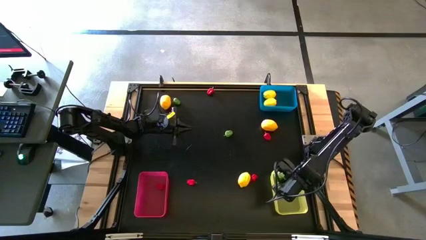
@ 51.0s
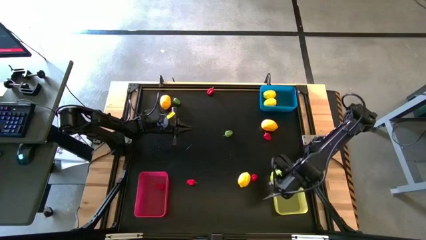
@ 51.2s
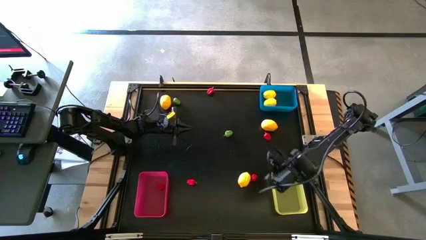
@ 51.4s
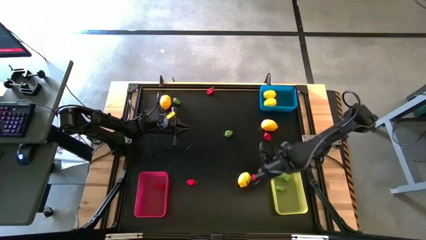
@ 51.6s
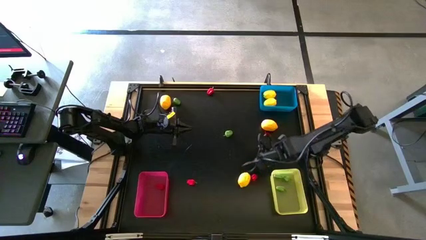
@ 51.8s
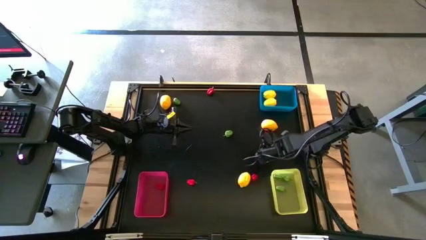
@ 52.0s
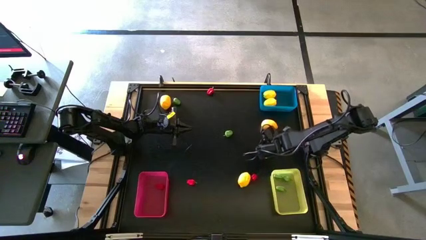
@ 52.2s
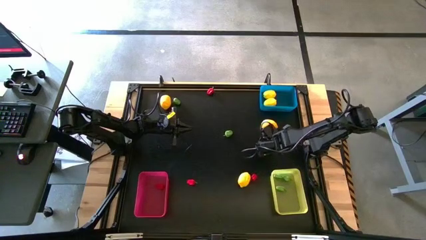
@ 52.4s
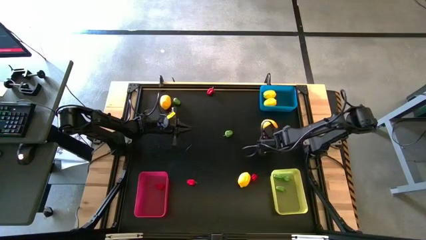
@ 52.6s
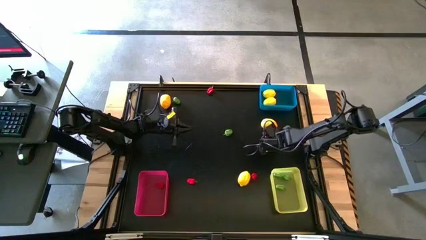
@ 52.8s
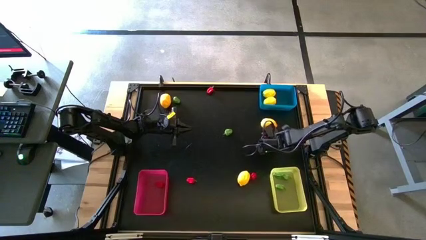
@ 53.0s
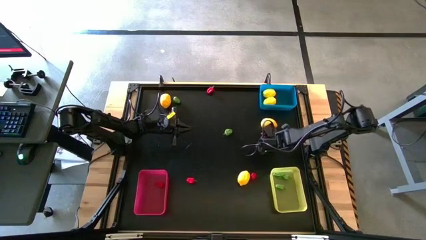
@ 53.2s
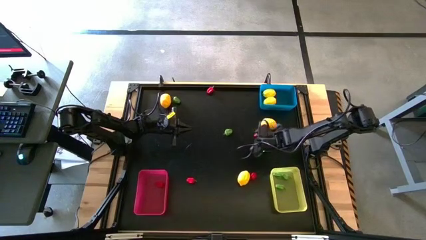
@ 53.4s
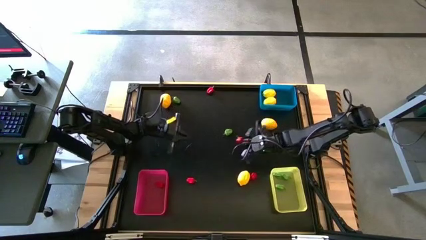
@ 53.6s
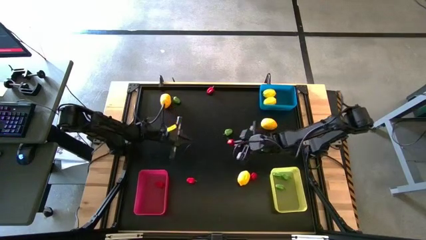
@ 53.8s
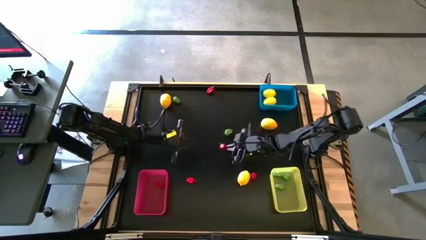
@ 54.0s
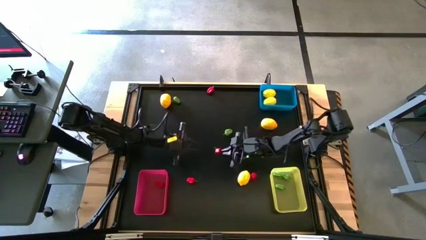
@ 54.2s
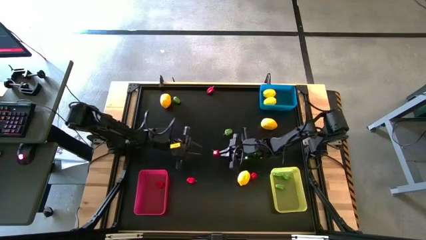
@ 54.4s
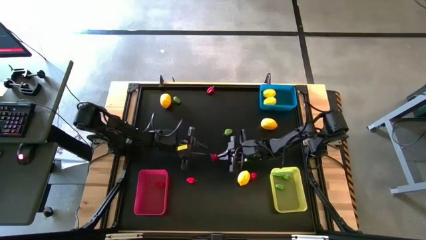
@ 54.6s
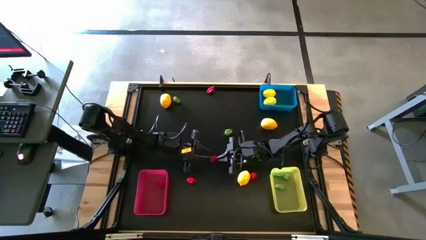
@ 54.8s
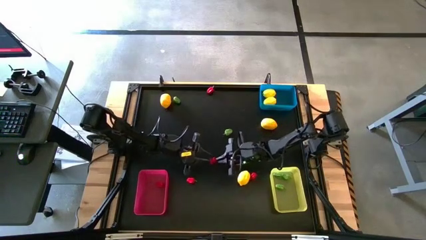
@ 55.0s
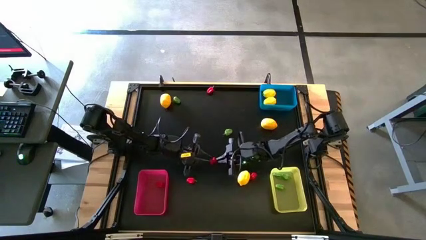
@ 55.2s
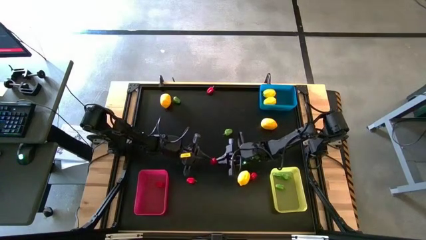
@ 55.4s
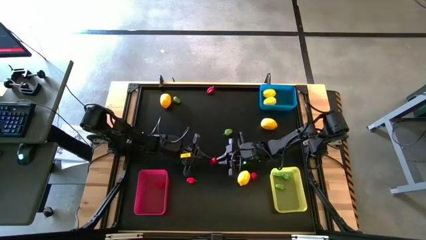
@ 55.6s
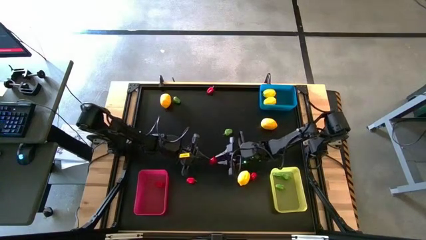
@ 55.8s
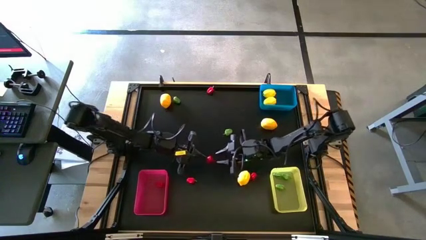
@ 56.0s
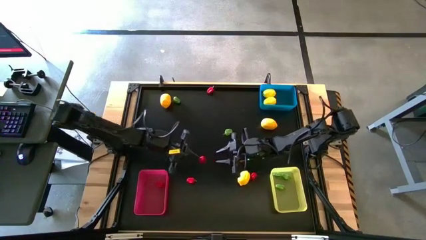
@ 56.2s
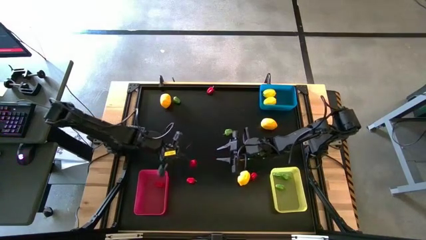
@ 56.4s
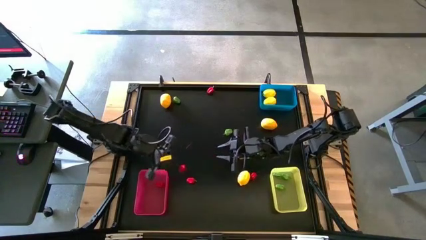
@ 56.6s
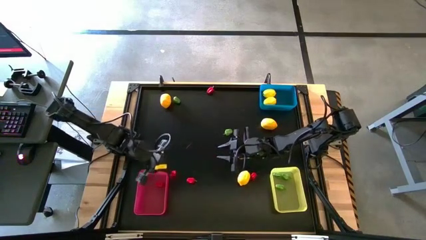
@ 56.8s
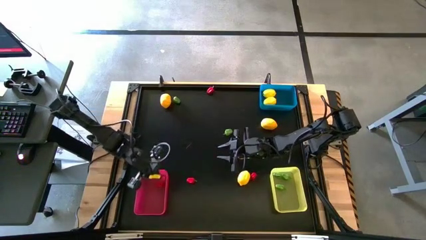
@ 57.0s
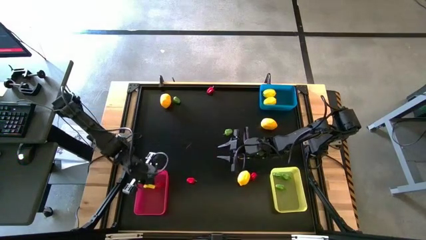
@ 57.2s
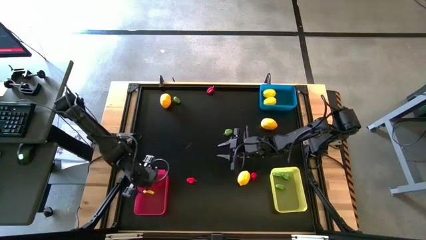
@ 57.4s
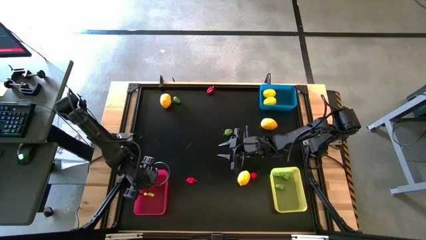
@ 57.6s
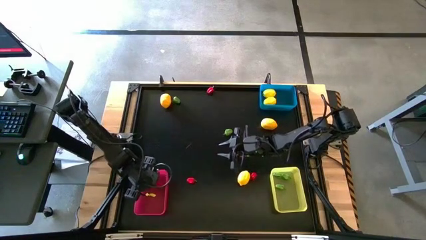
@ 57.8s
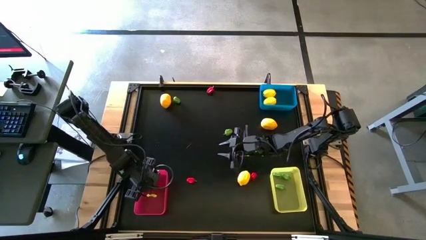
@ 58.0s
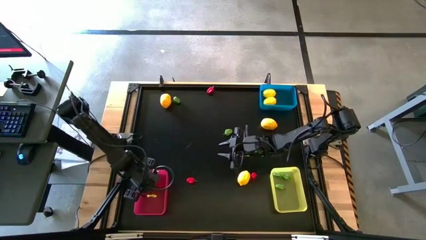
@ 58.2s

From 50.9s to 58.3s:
Task: Sort produce into baskets
Put the red chili pepper into the red bin

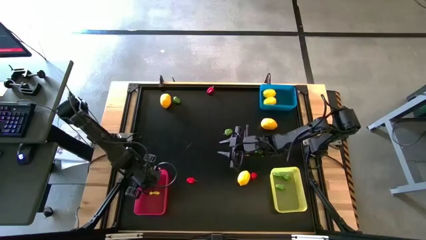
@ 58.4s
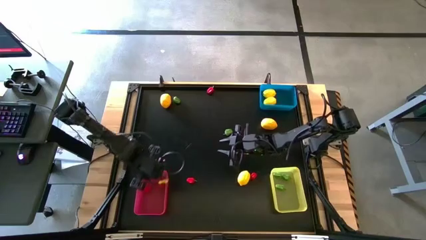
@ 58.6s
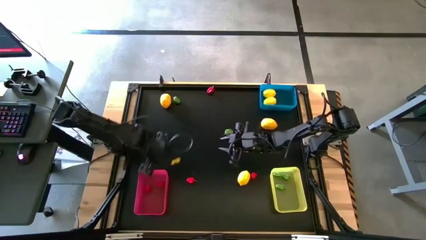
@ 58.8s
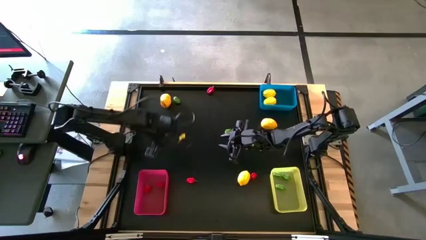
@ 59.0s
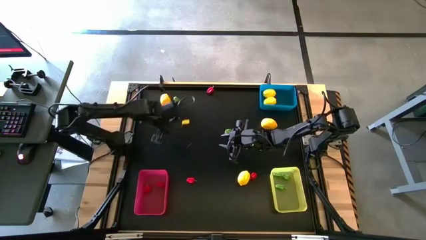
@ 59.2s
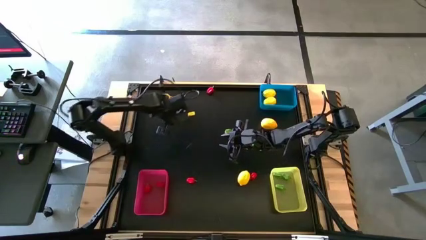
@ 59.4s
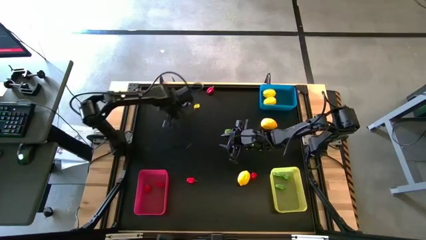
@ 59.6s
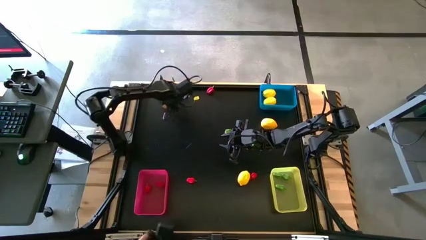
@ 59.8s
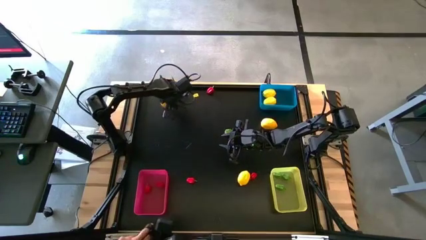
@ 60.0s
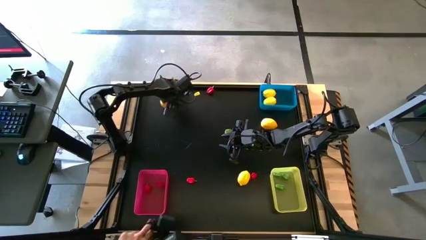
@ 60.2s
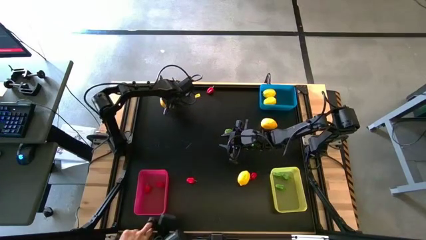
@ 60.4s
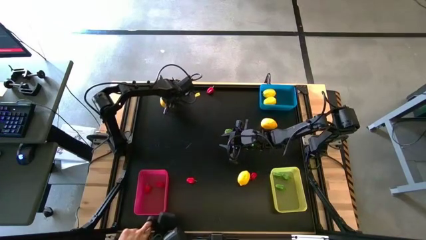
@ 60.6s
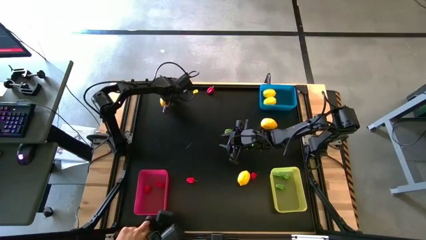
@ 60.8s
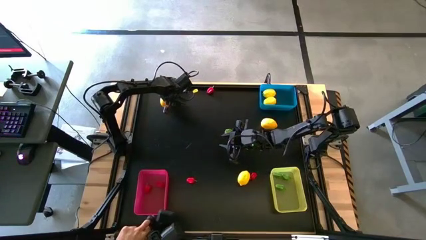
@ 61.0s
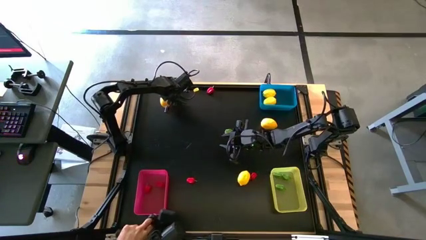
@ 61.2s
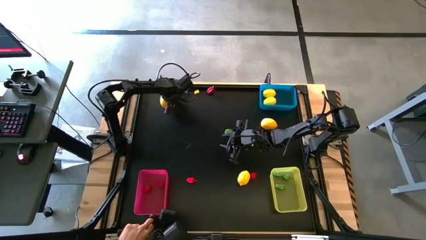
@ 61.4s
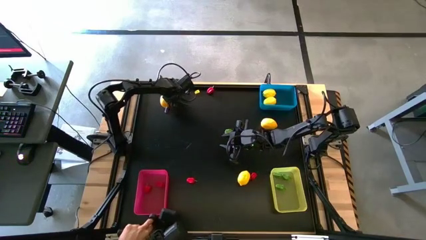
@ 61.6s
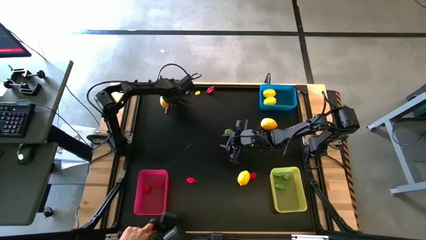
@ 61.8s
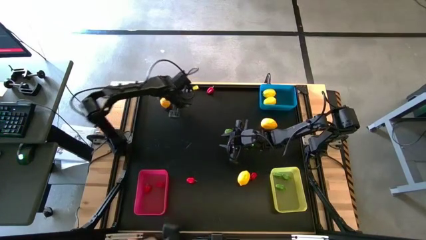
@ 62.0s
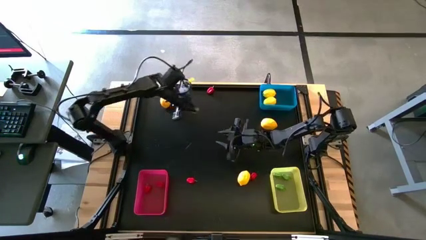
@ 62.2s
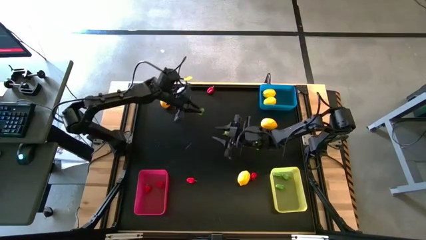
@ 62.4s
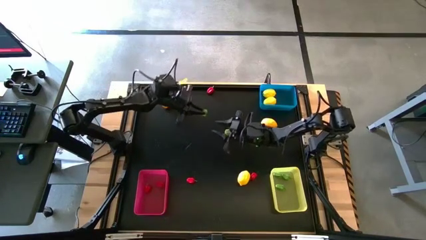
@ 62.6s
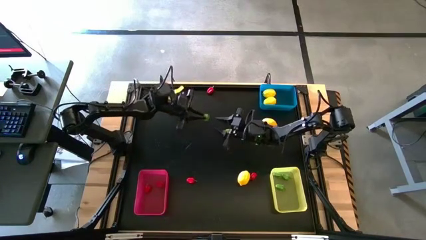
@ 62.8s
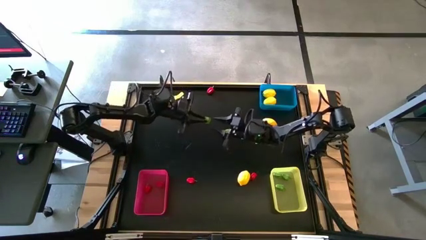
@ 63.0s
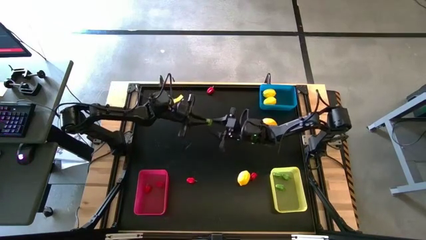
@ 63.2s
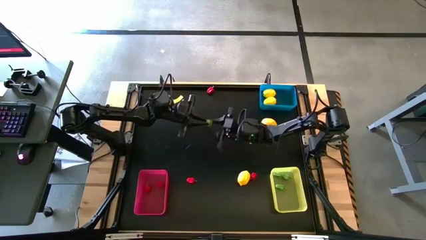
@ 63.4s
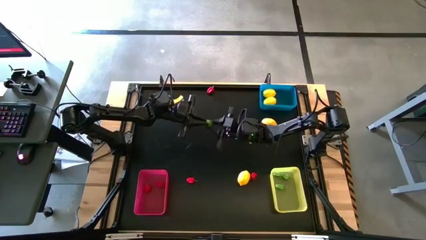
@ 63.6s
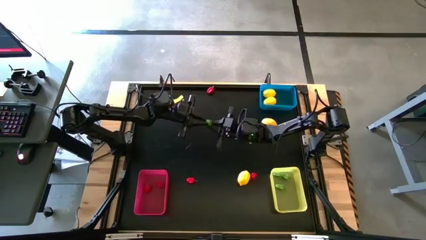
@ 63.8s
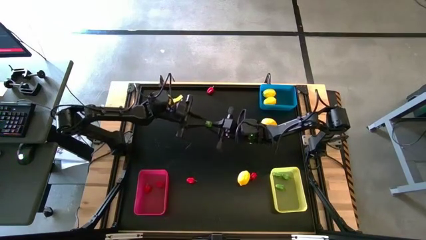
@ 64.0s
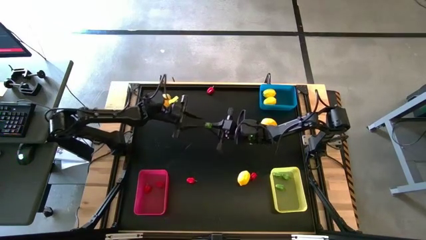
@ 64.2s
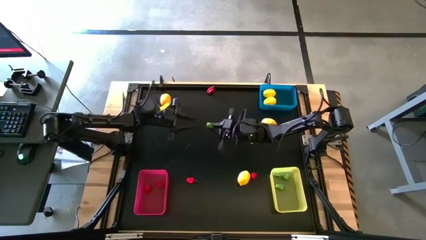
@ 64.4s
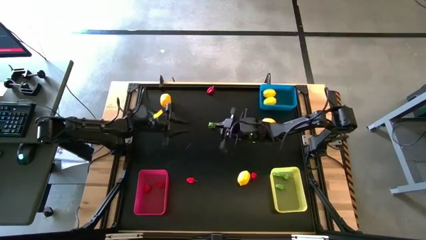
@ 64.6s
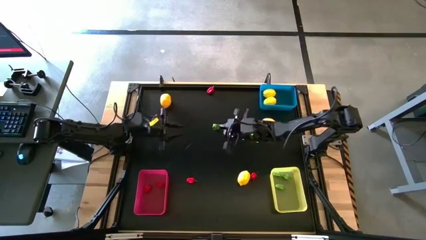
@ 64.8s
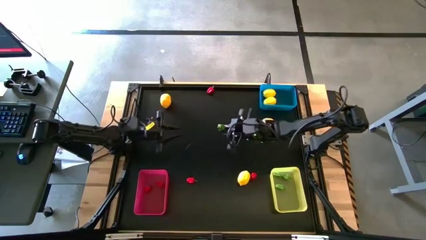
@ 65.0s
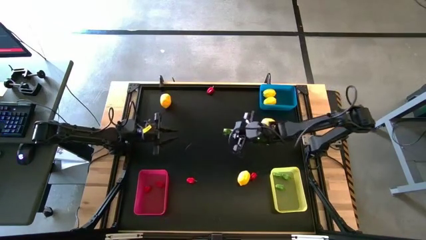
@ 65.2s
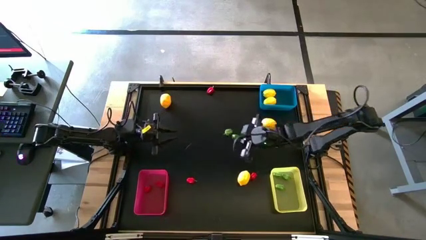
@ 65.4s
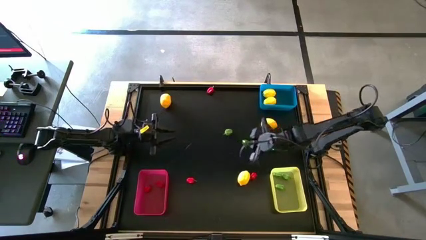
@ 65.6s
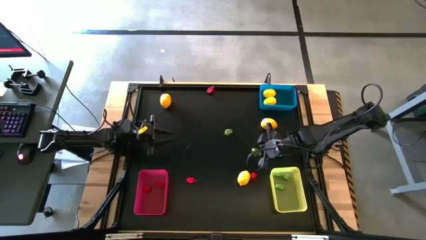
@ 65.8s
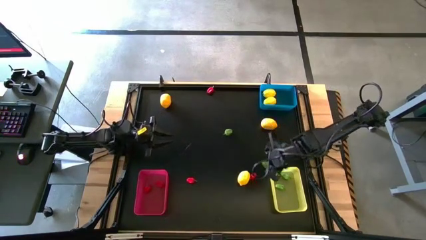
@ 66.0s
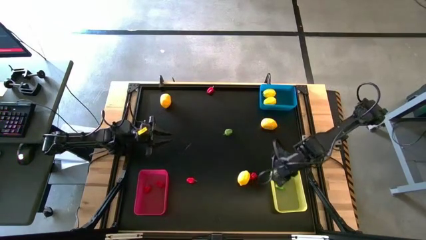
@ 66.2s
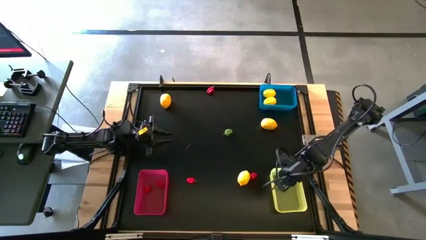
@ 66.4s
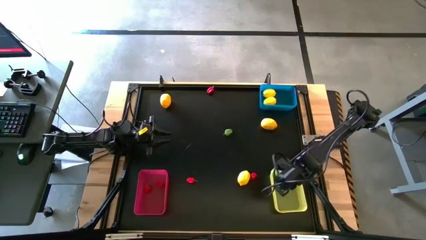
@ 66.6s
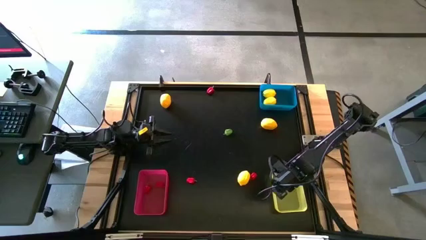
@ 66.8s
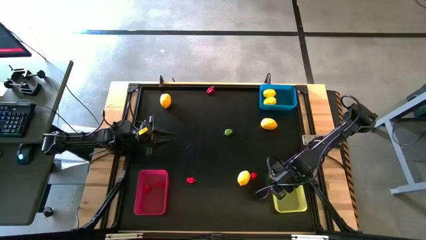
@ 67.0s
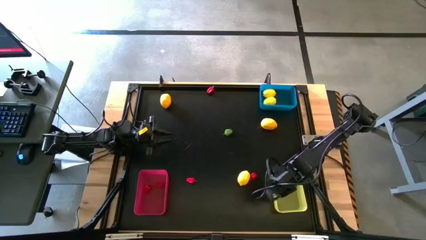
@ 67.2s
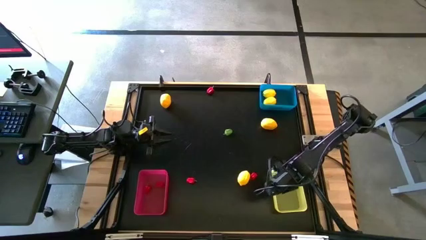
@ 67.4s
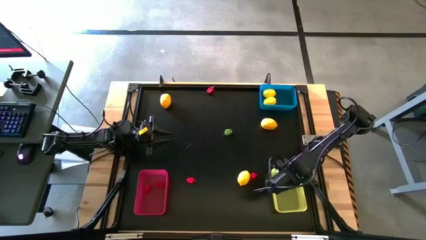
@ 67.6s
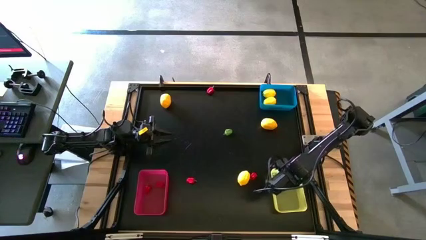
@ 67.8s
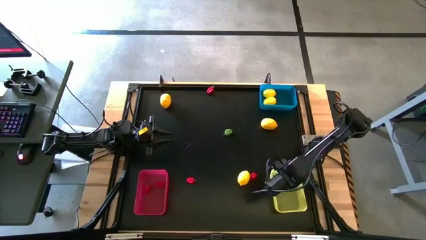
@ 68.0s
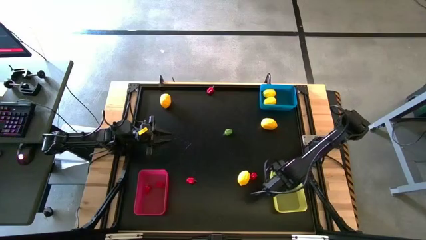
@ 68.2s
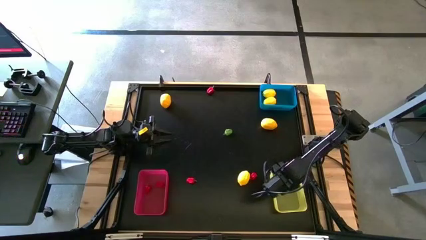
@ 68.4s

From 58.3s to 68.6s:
Put the green chili pepper into the yellow bin
